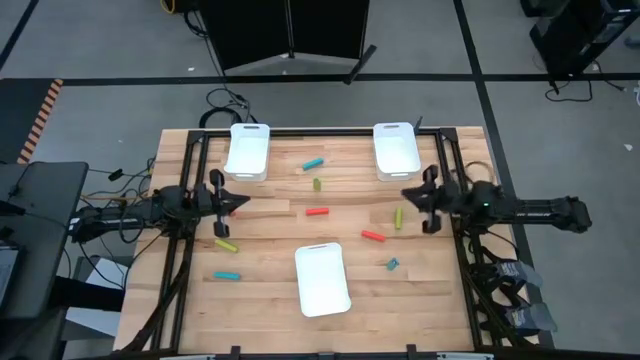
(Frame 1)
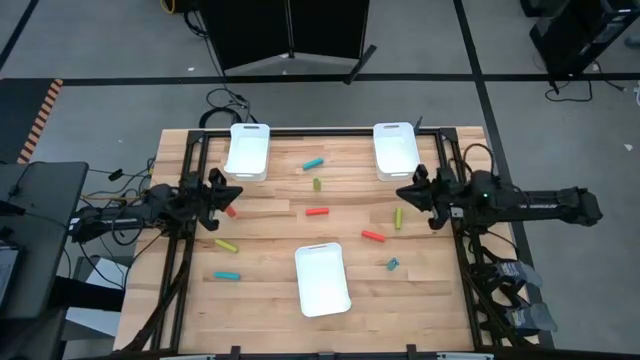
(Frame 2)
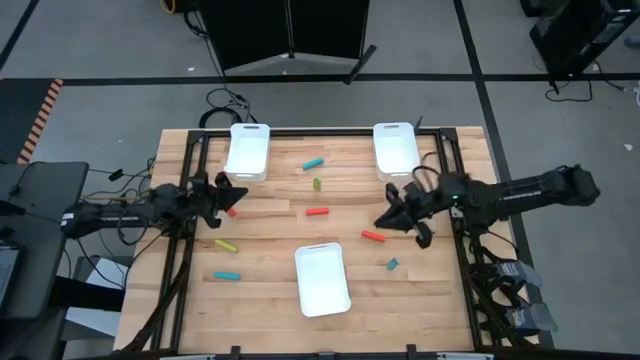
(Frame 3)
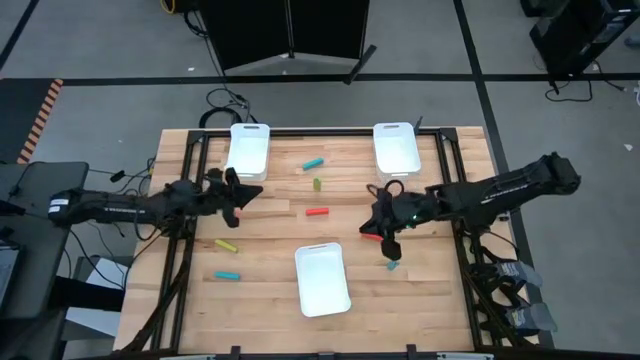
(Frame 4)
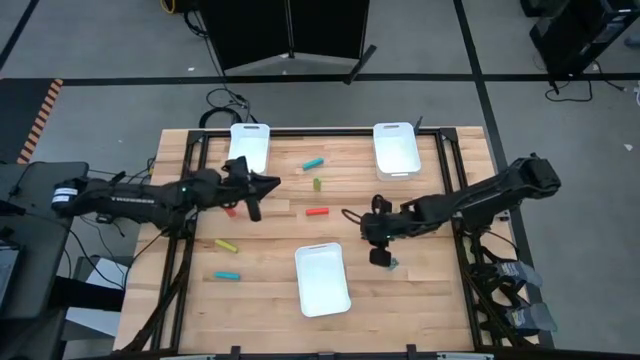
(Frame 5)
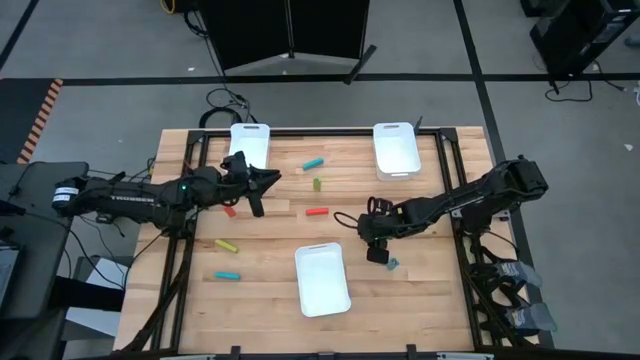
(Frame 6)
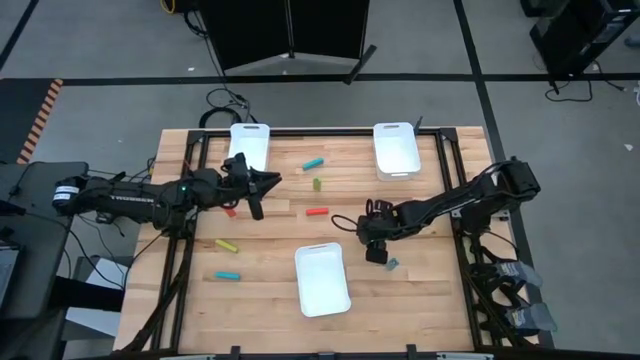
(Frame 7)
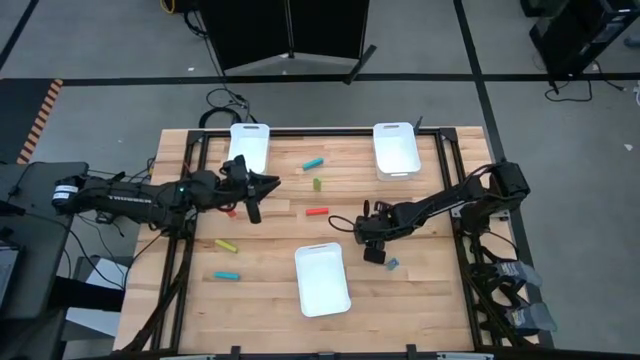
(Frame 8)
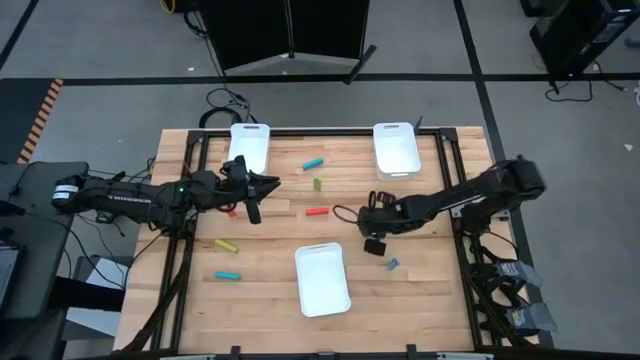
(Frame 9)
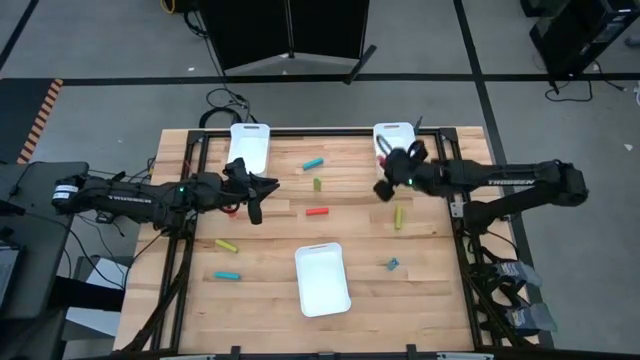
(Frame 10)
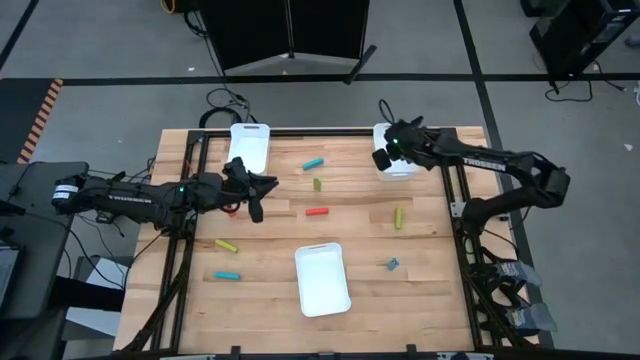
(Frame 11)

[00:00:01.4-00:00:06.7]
Task: Sort blocks
Put the right orange block into the top right white bin

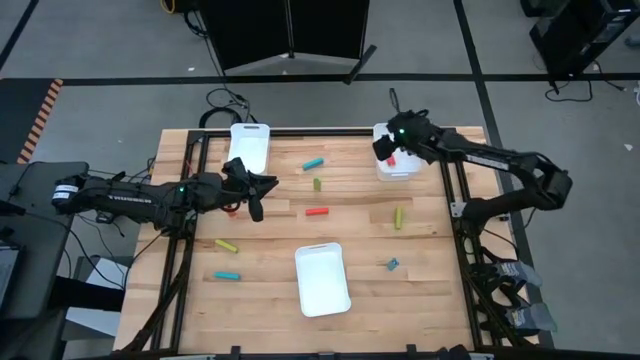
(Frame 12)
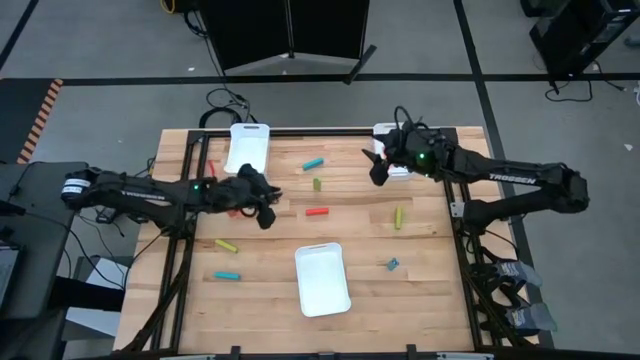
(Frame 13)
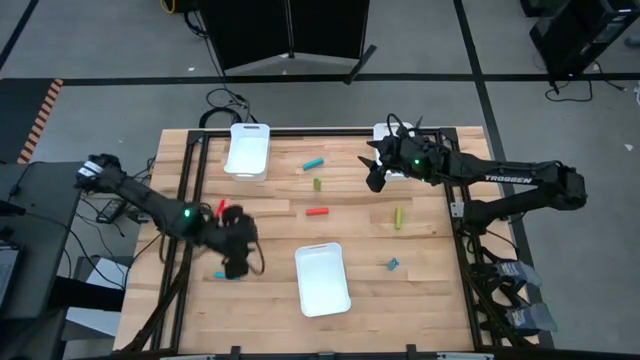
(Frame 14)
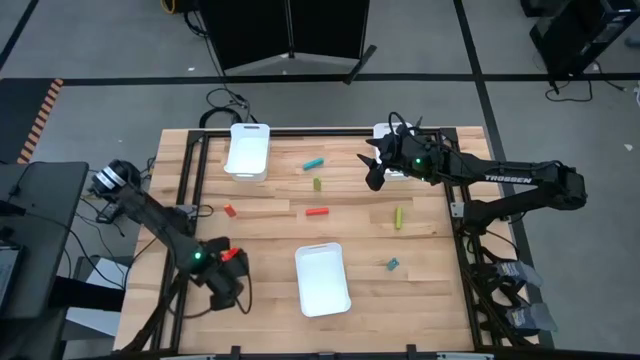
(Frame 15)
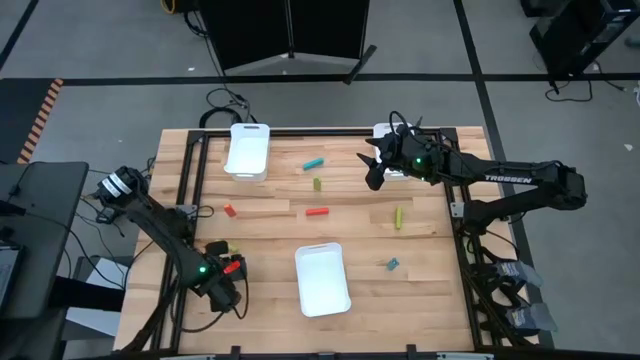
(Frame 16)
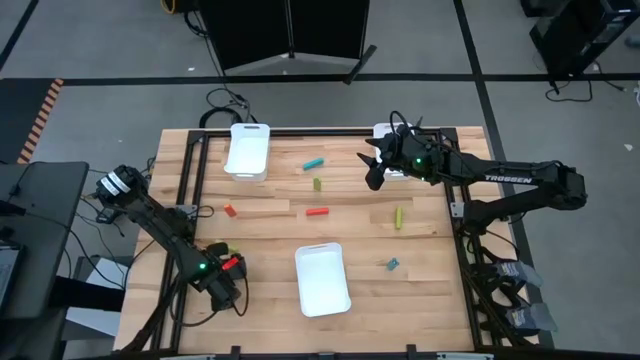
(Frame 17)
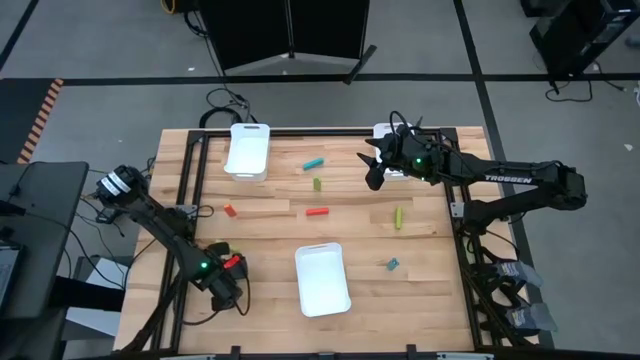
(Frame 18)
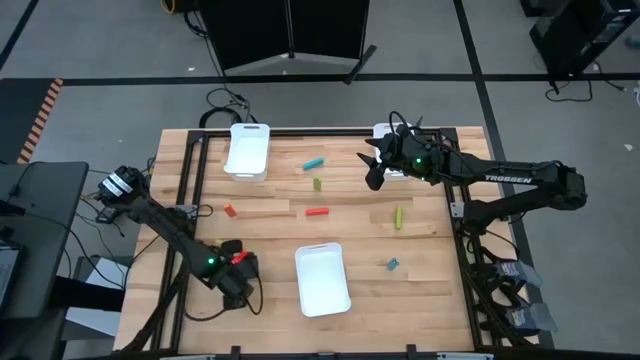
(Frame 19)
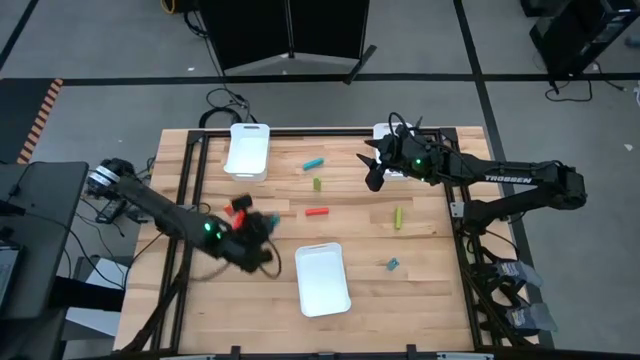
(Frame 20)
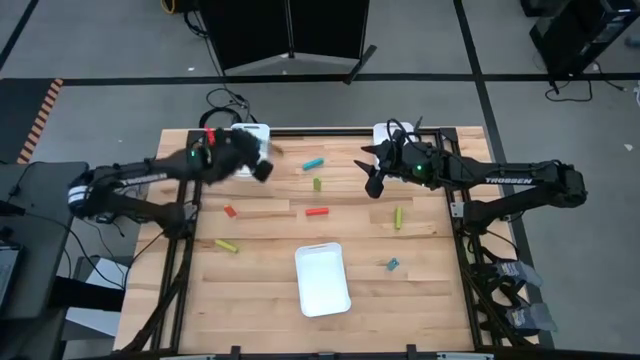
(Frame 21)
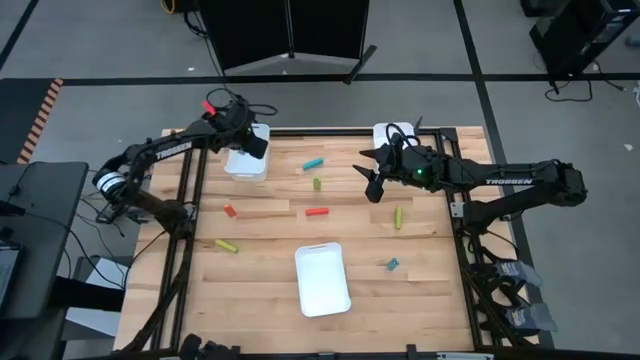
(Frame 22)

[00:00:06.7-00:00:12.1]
Put the bottom left blue block into the top left white bin

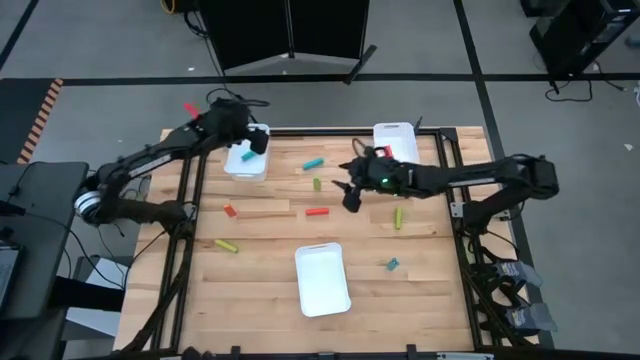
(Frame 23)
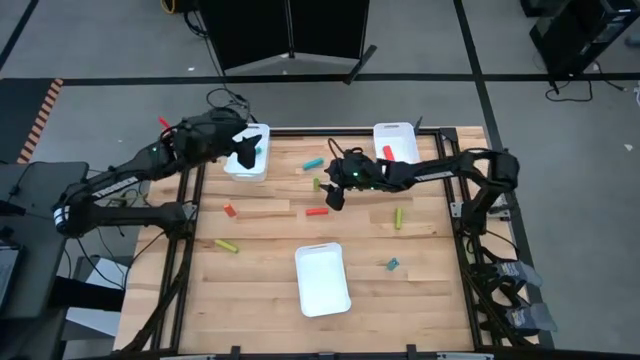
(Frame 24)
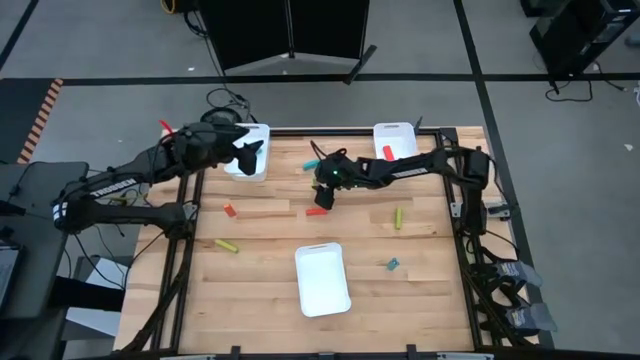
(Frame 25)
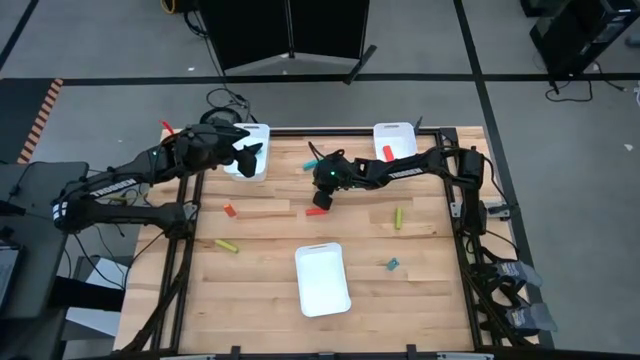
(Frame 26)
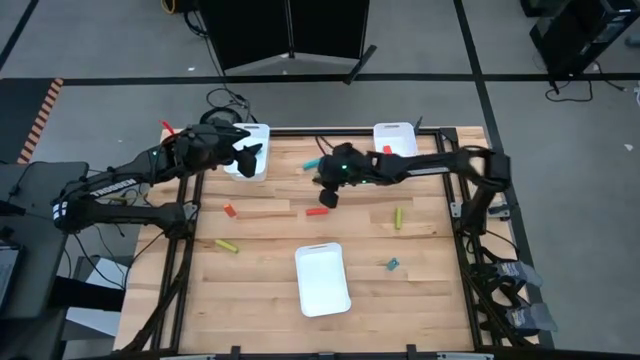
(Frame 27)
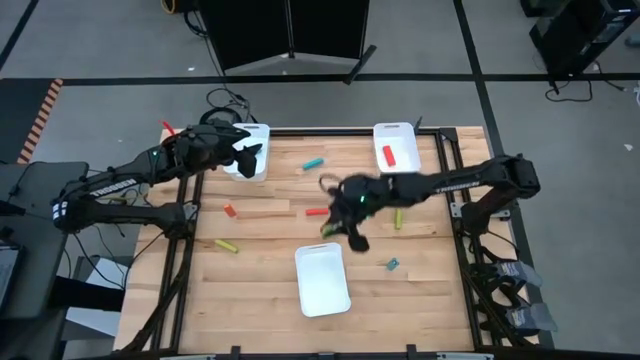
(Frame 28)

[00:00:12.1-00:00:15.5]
Put the center green block into the bottom center white bin

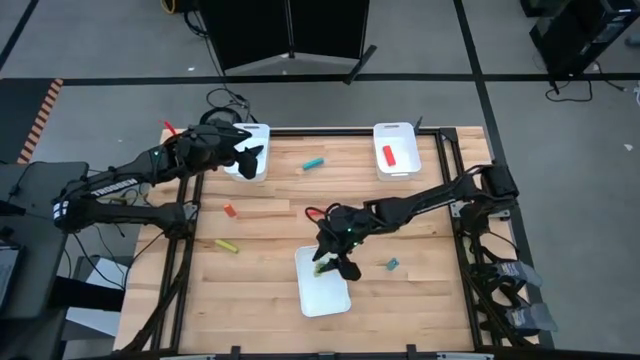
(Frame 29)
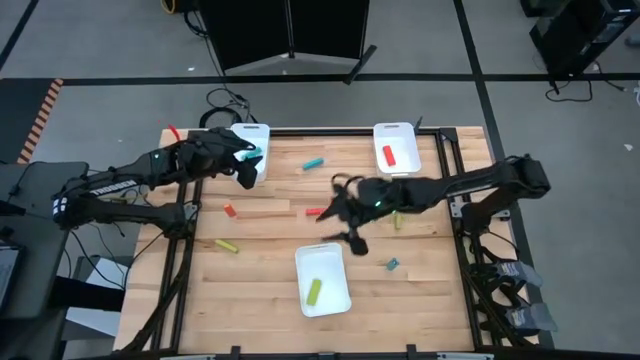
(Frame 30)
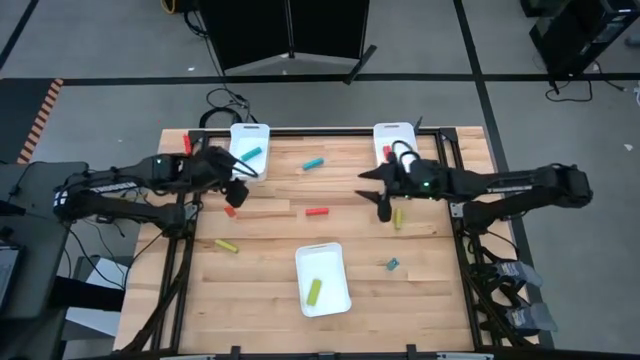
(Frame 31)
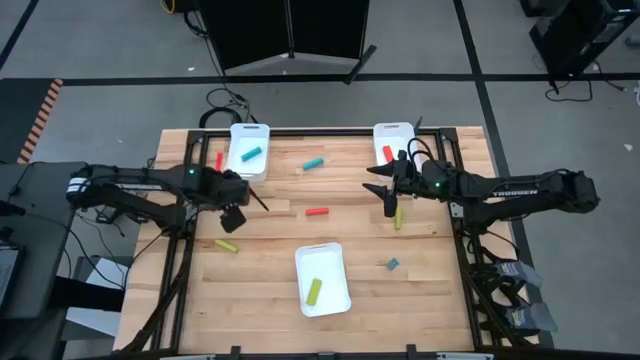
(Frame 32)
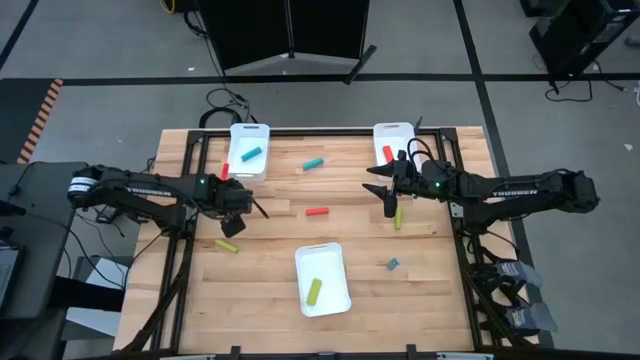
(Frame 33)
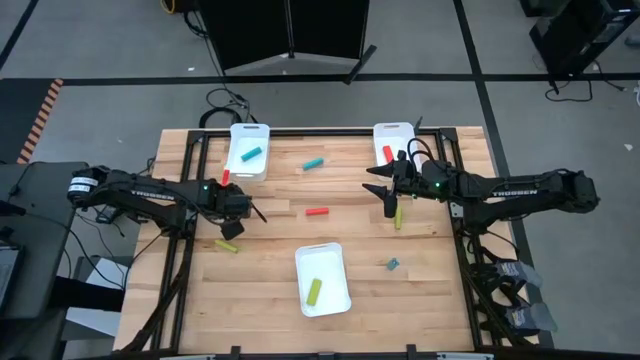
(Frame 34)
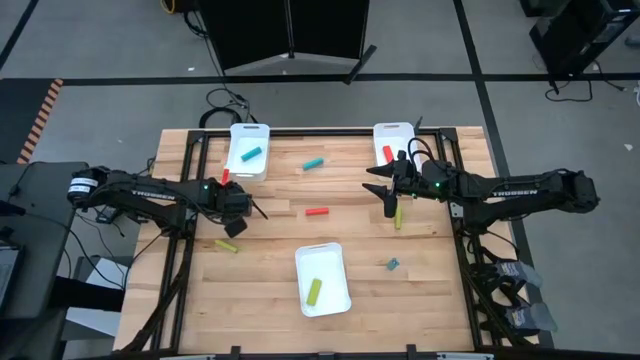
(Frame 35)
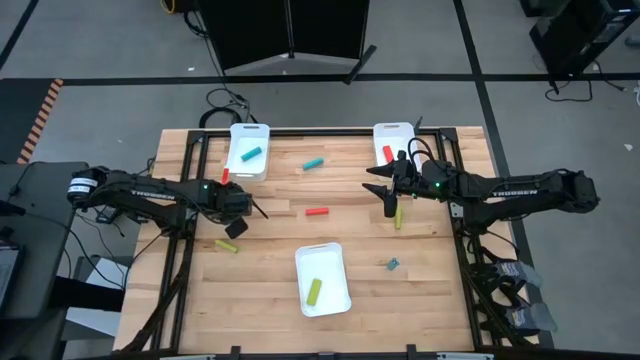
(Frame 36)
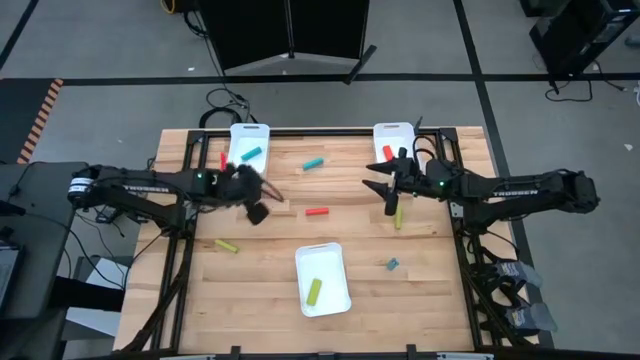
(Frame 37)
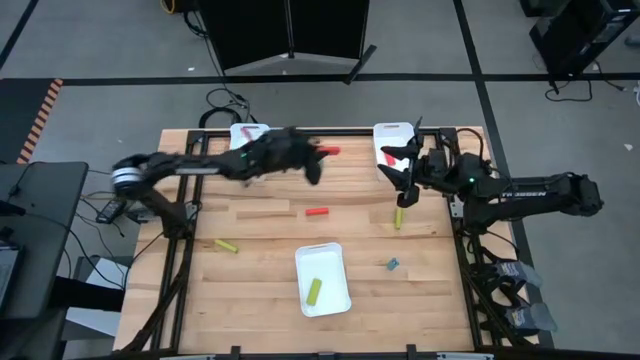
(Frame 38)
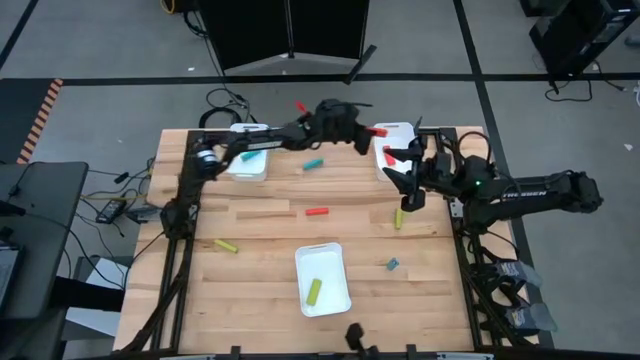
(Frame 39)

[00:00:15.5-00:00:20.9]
Put the left orange block into the top right white bin

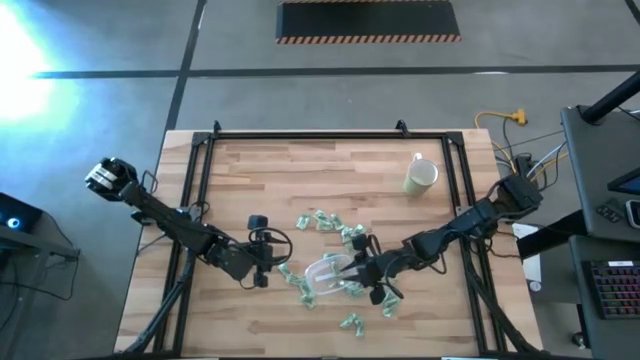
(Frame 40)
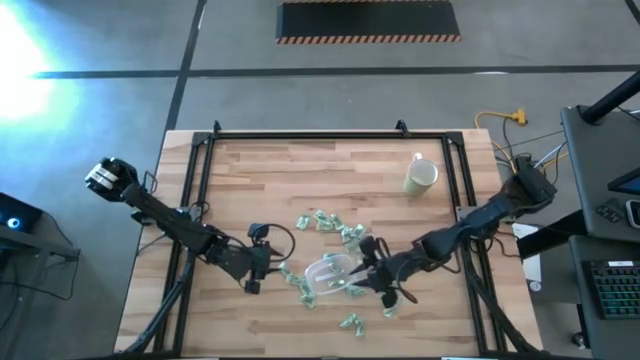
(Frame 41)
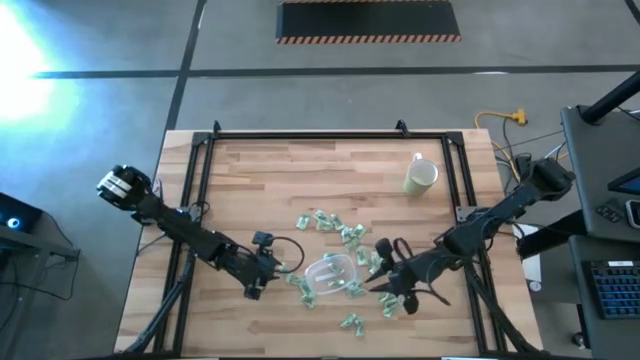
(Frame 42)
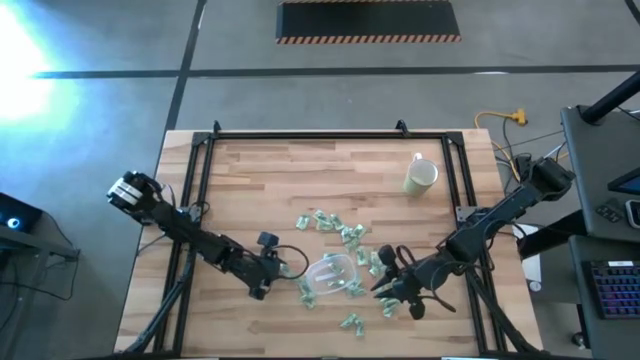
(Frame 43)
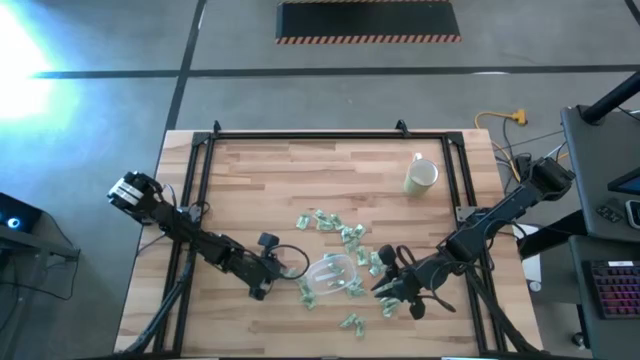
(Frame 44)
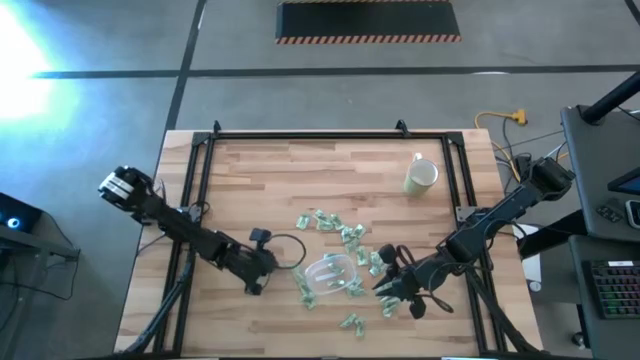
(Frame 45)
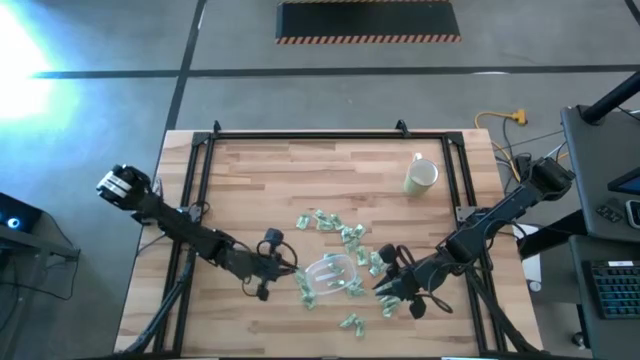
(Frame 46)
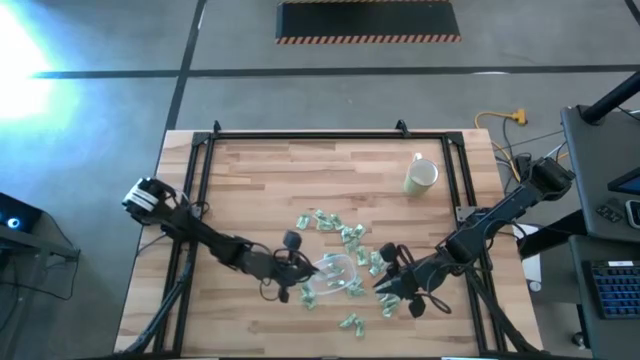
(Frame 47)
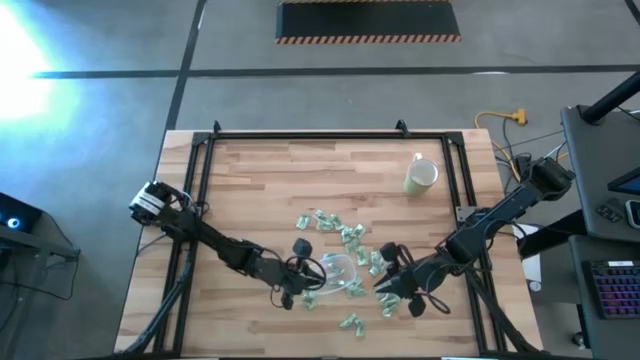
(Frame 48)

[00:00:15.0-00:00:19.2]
Task: Pick and place items into bin
Put the Stevia packet into the transparent bin
